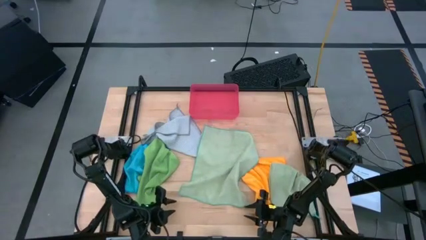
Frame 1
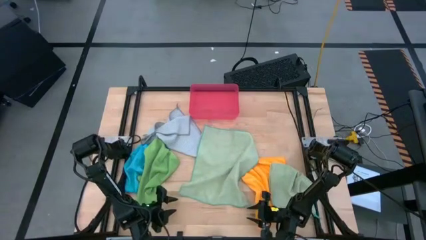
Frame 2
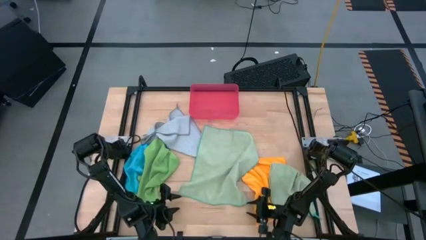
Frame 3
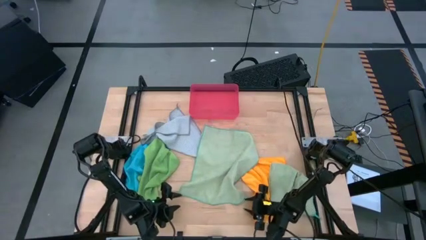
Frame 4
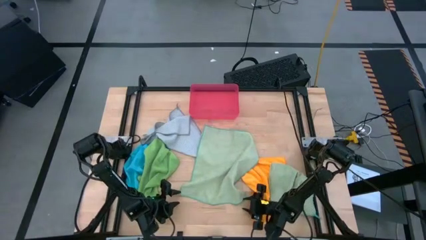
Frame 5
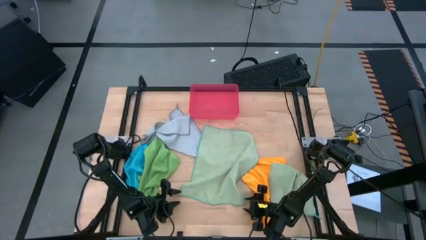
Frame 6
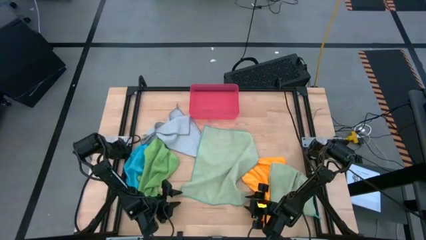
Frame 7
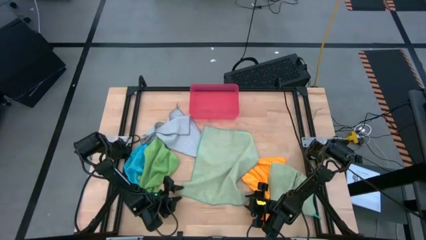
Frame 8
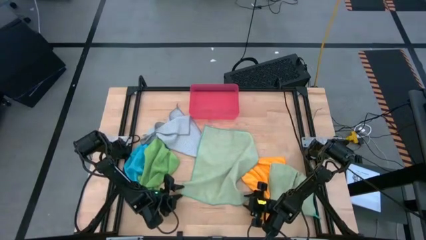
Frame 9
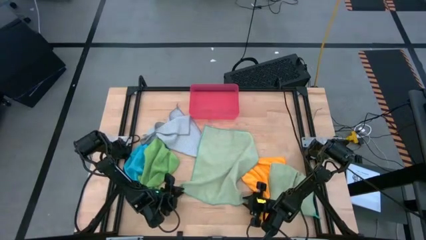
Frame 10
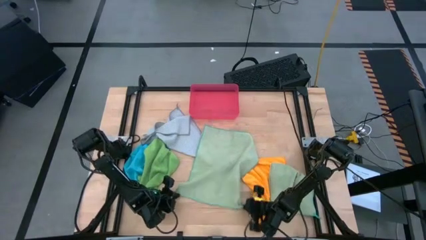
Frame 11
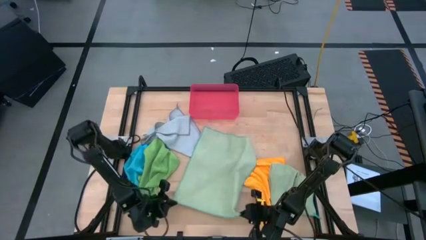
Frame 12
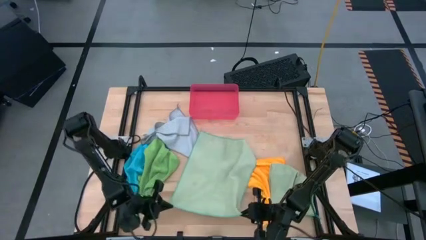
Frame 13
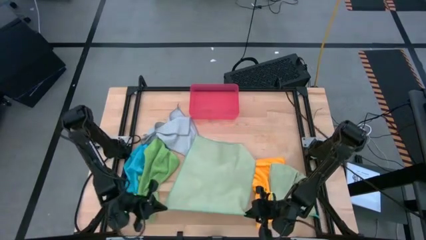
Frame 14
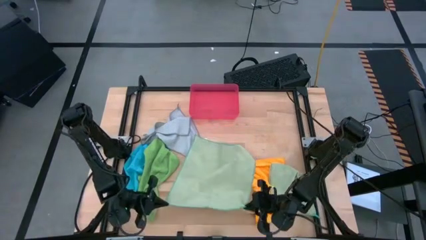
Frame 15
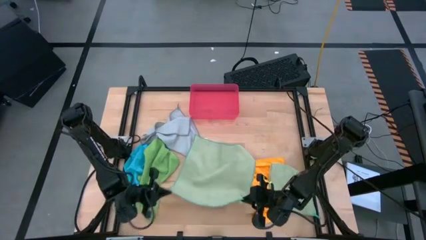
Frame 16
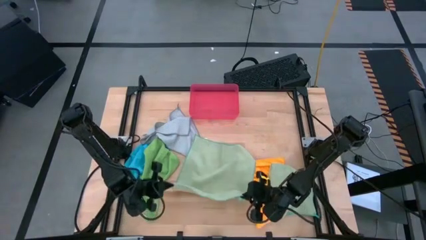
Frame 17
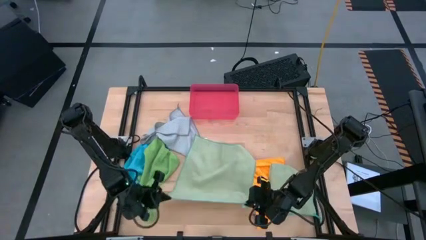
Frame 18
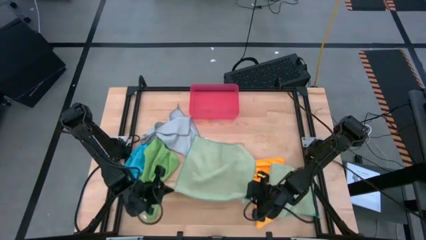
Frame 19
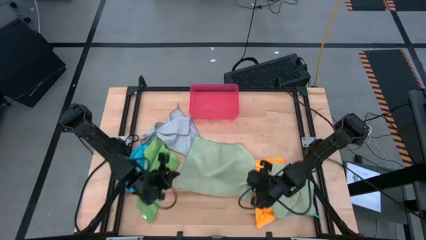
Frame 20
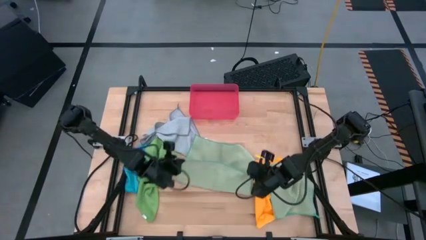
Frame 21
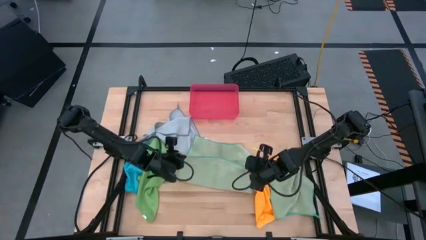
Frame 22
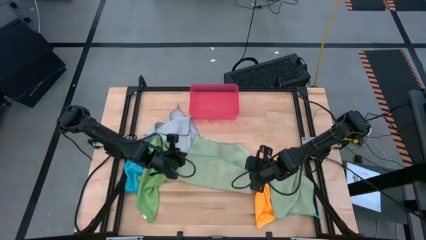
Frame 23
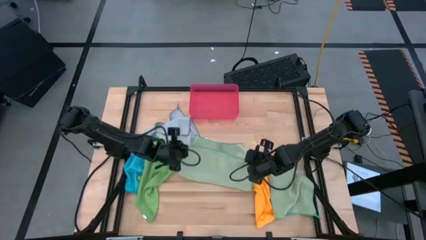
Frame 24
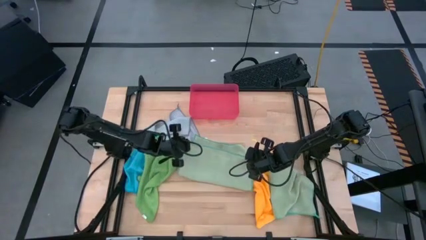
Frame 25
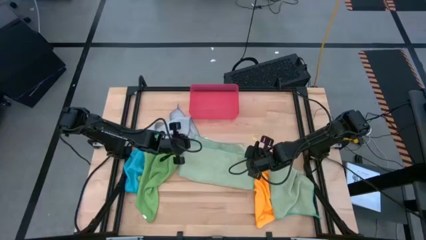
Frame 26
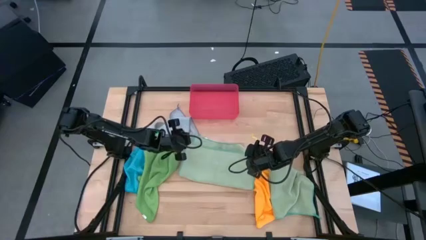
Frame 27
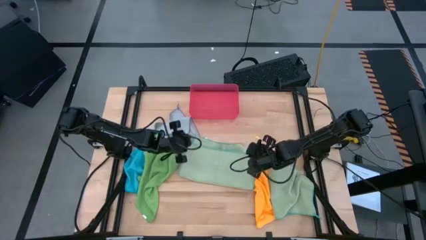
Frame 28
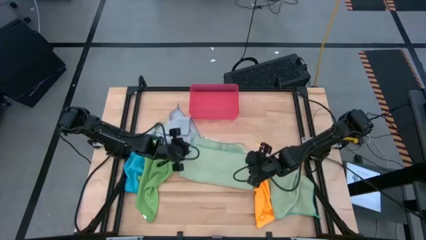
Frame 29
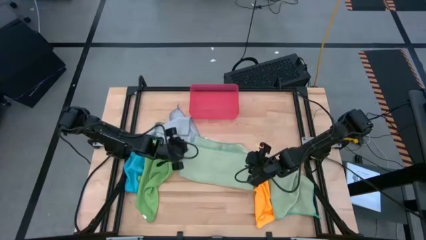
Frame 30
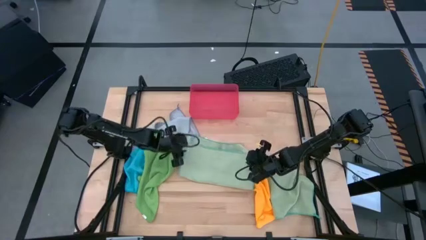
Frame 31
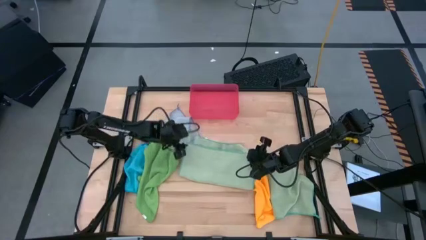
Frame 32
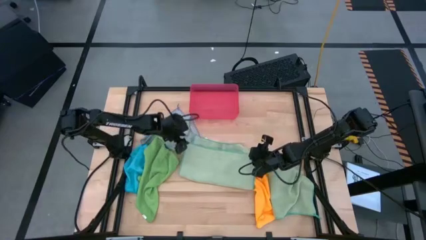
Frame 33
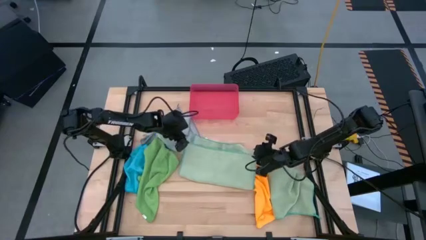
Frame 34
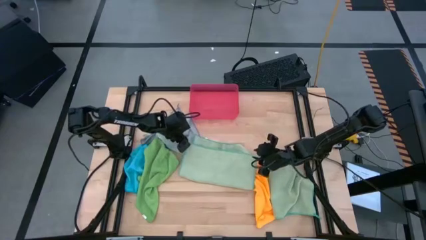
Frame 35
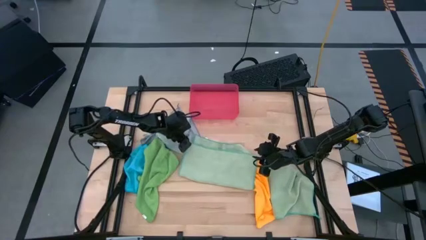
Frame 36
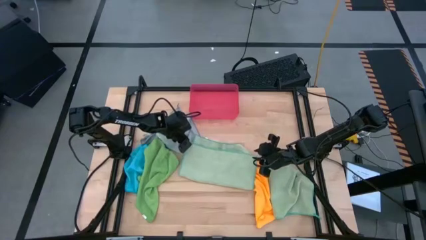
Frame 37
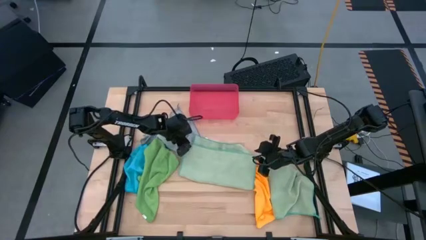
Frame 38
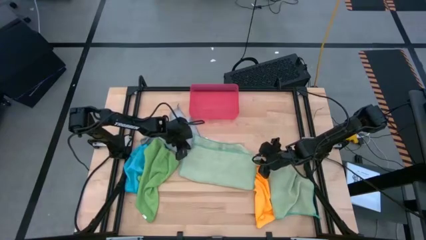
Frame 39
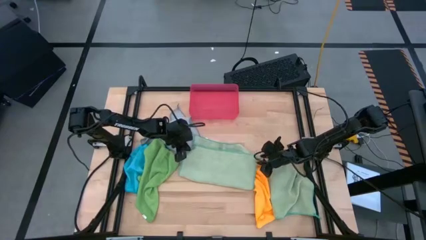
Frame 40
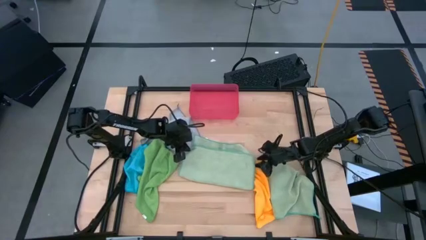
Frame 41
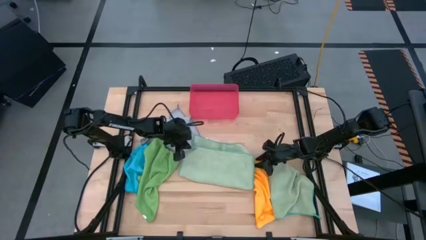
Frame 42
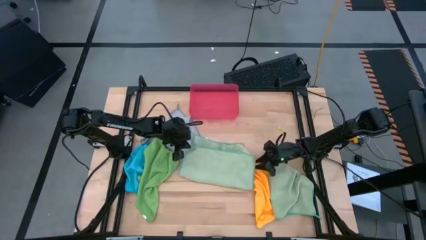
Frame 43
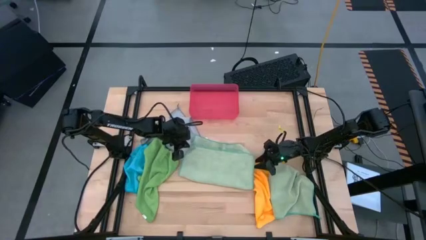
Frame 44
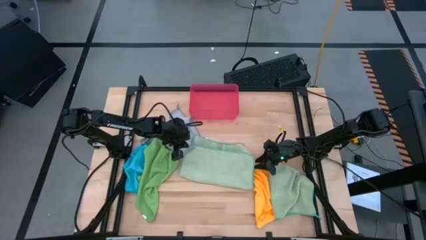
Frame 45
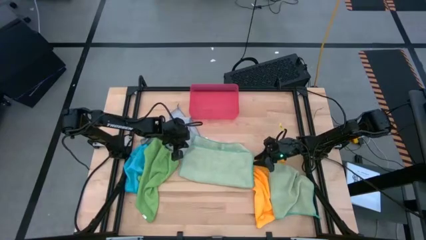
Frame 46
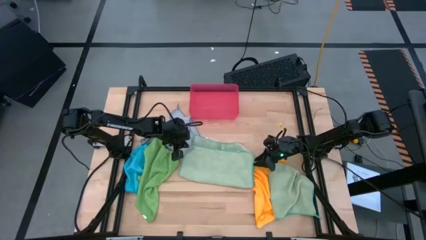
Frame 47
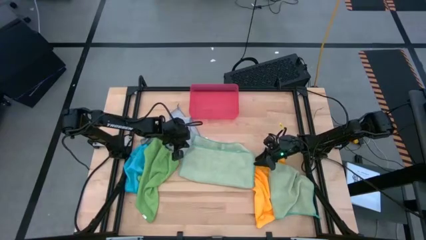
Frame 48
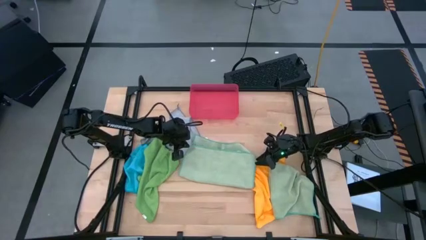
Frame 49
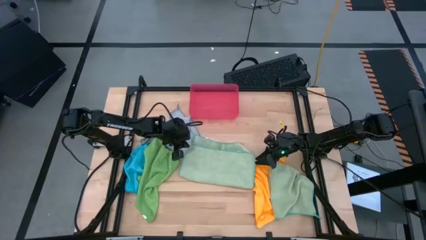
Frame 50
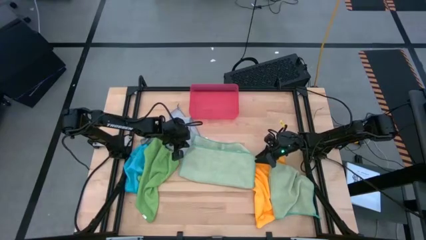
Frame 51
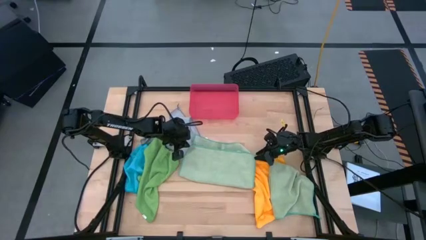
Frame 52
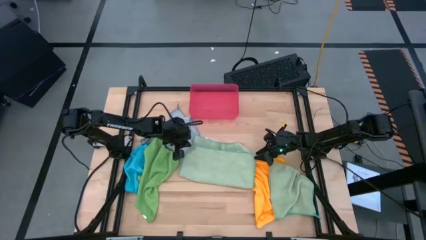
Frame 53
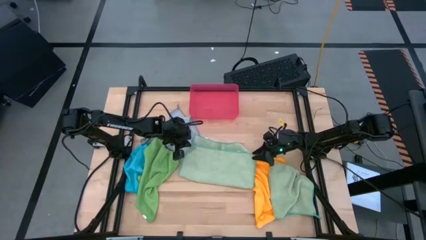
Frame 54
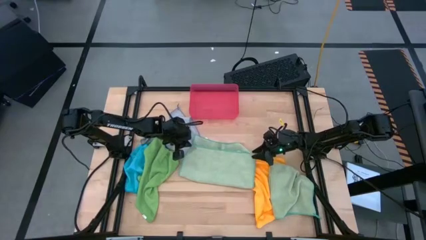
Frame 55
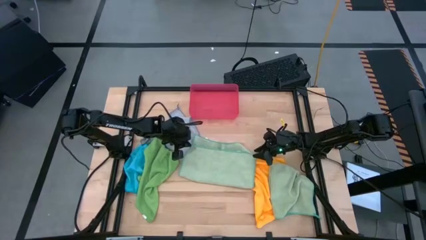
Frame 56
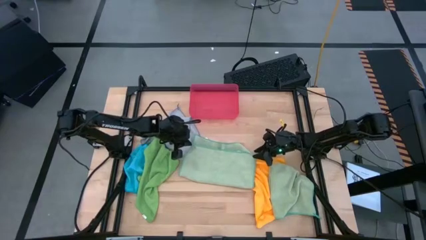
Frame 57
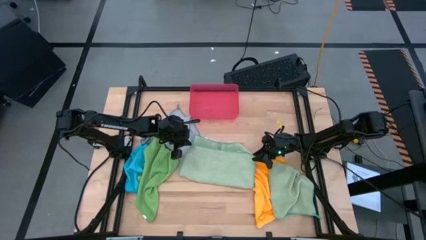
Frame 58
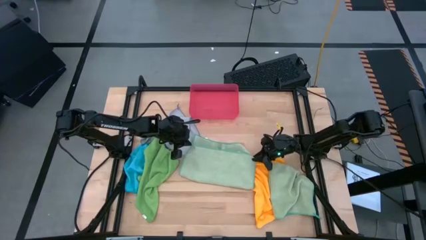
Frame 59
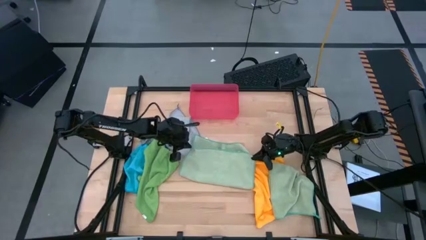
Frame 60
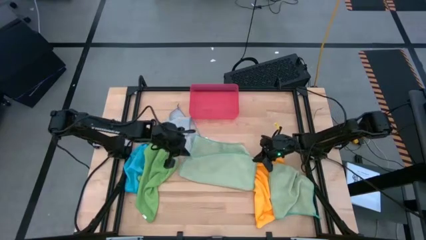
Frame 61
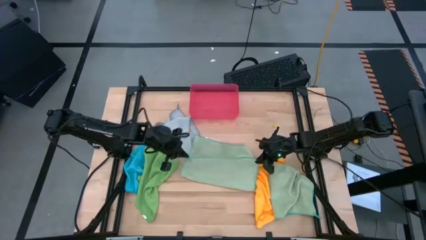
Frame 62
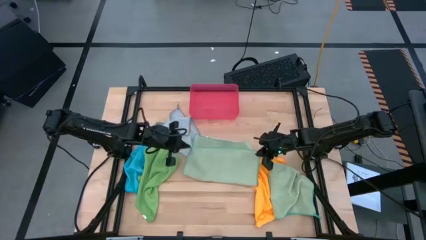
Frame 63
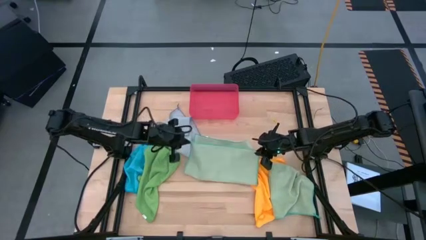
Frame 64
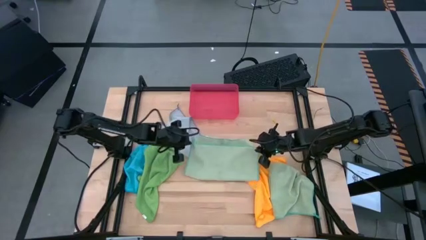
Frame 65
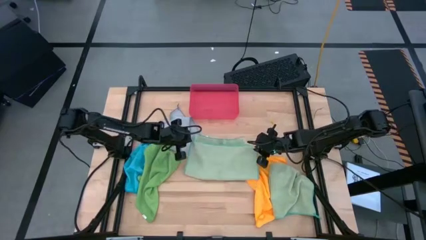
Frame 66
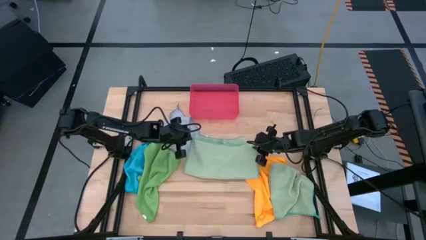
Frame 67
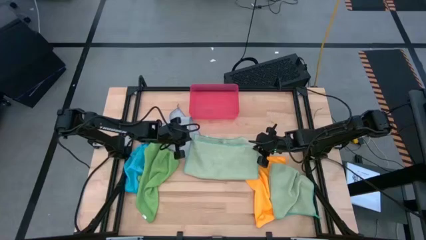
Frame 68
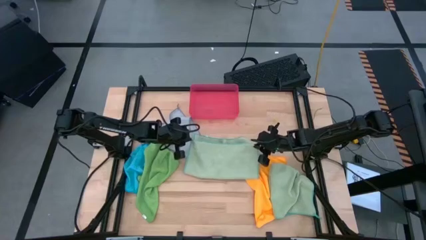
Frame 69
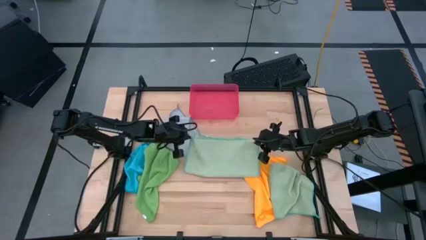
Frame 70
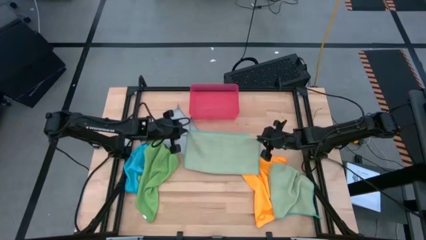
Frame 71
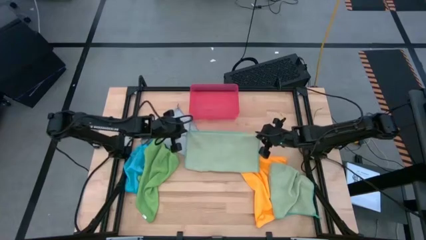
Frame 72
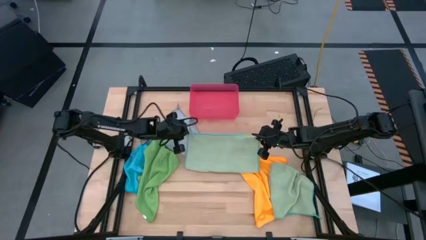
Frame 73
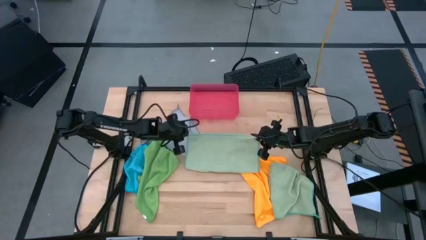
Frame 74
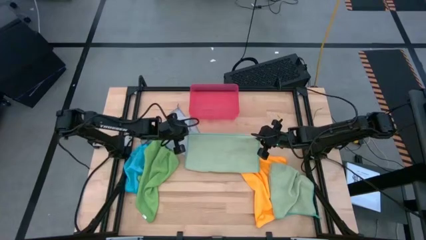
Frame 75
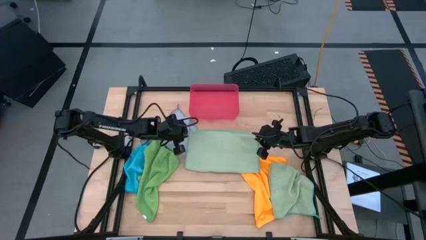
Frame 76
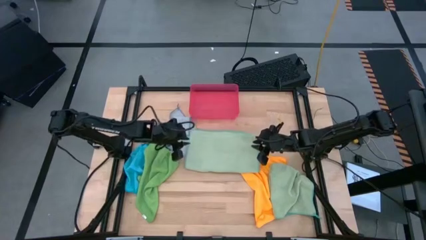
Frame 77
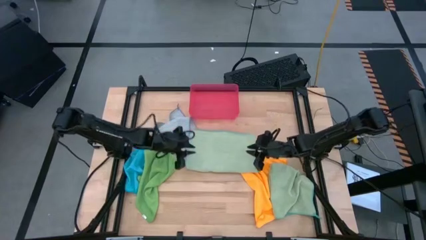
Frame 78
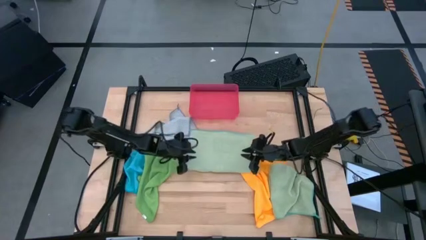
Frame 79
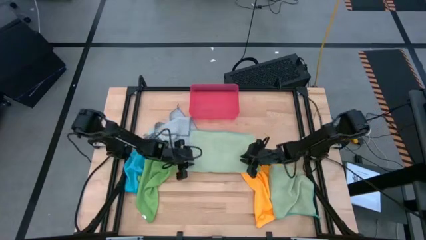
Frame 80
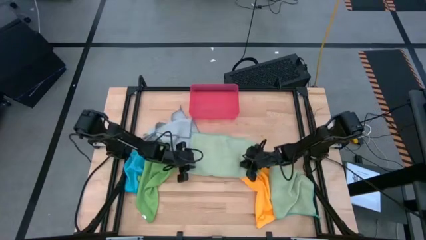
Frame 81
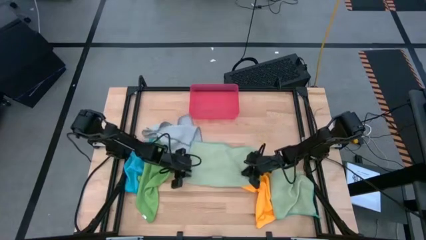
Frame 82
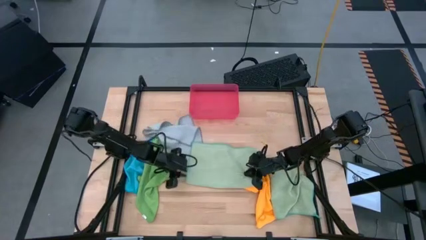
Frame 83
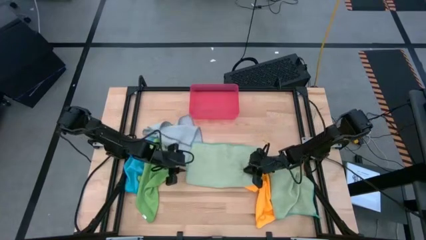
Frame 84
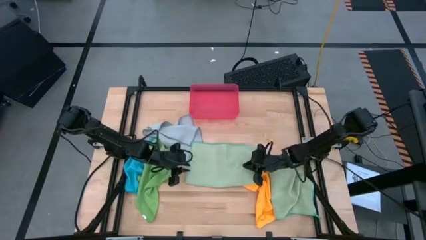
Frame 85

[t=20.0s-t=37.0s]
Task: Fold microfiber towels
Fold the top light green towel
